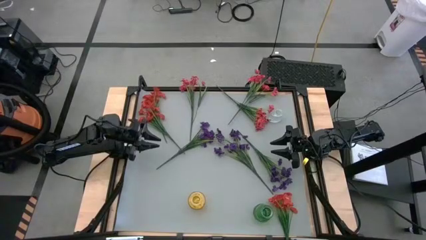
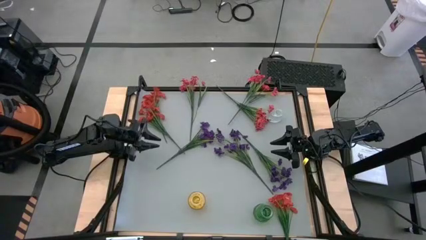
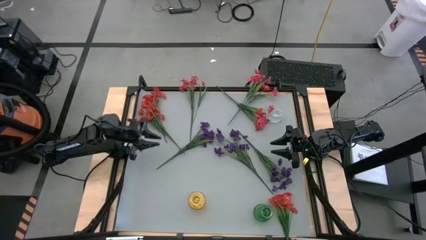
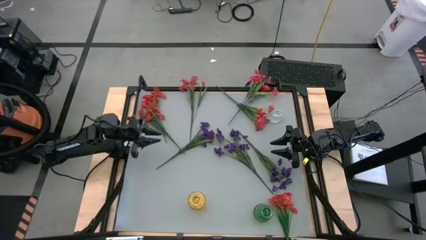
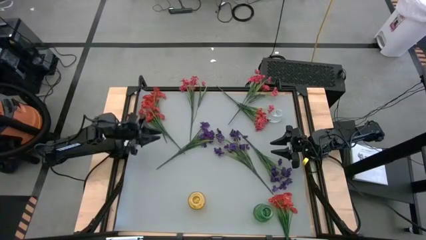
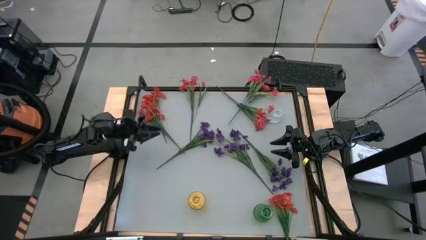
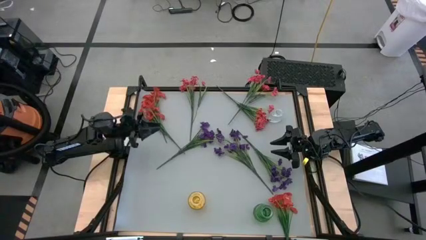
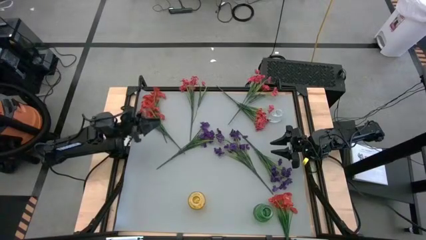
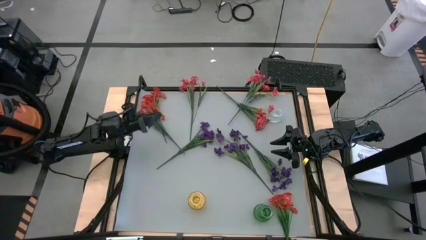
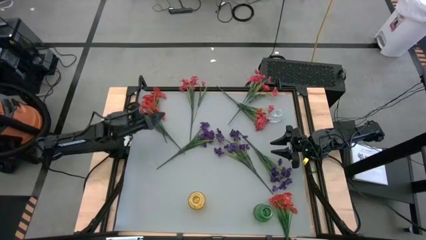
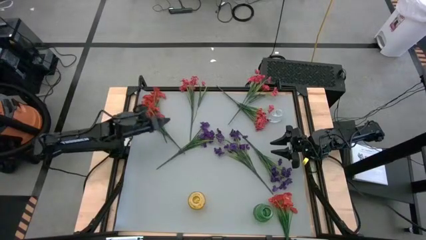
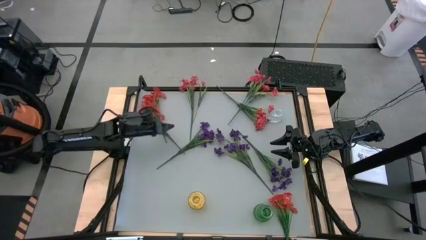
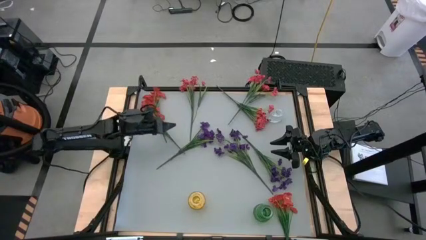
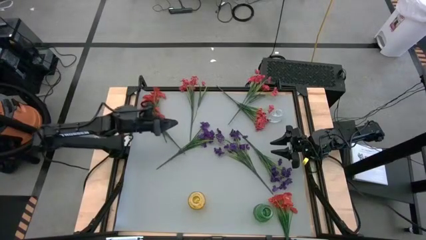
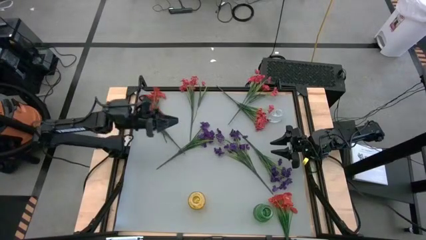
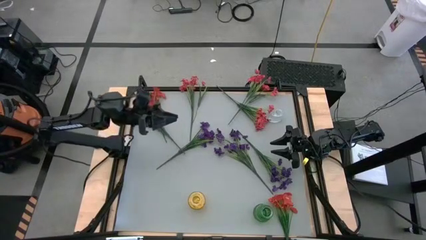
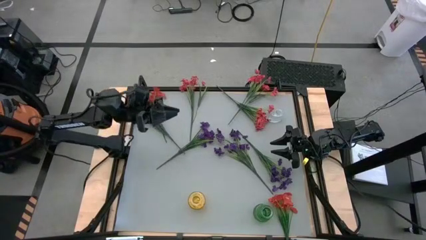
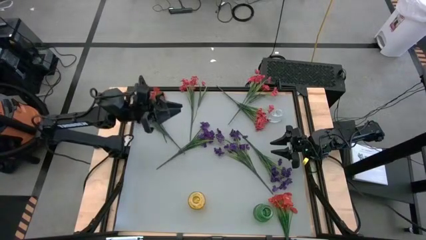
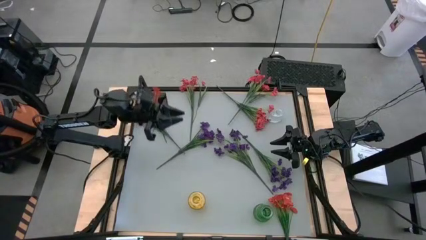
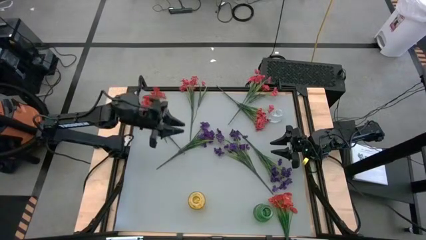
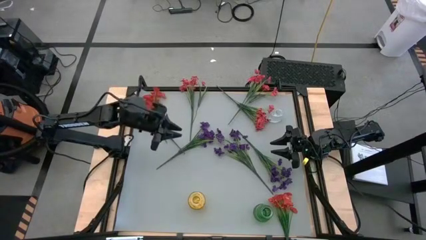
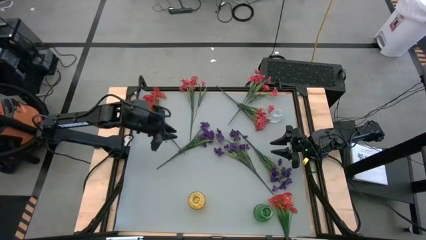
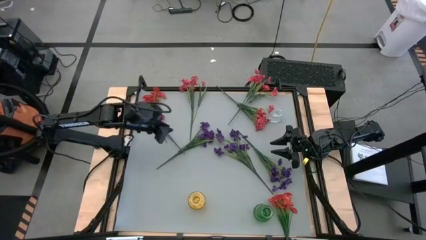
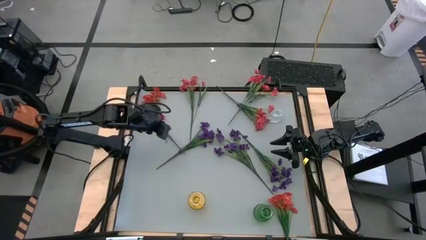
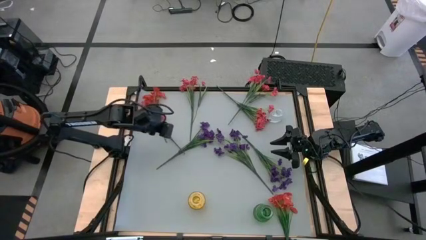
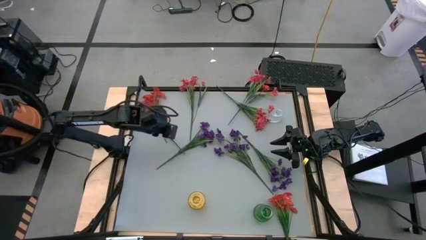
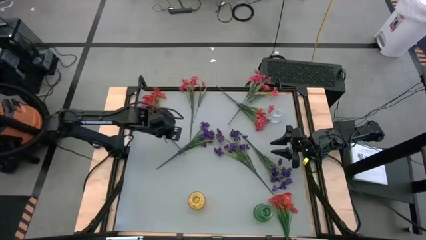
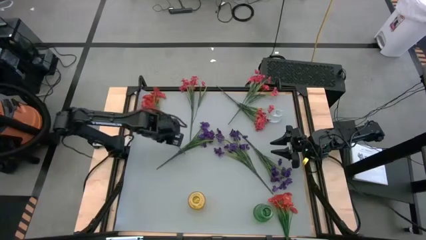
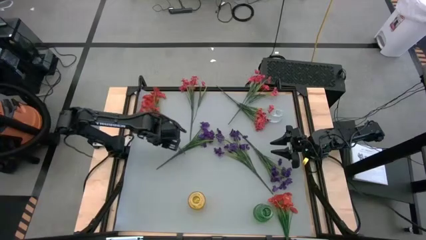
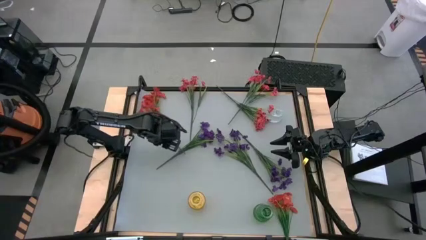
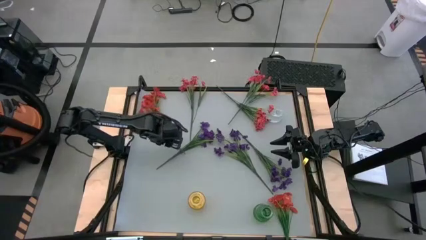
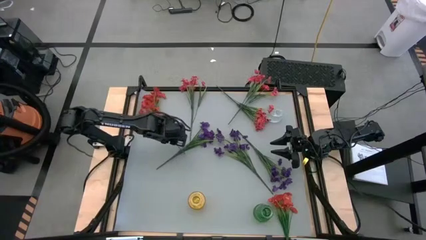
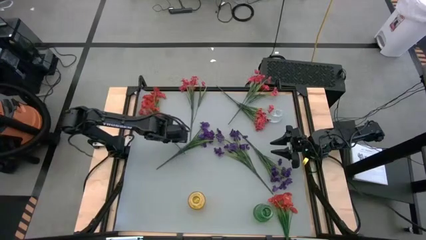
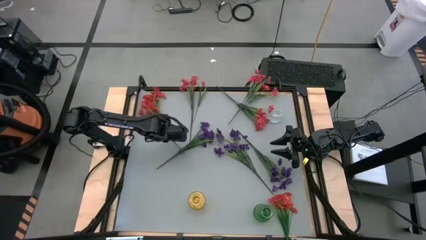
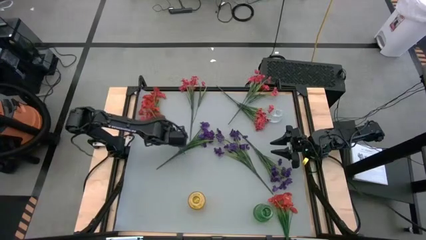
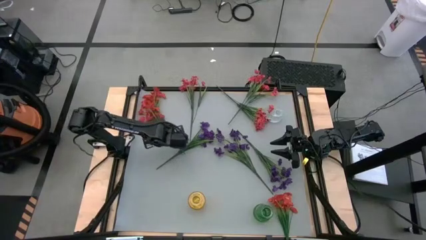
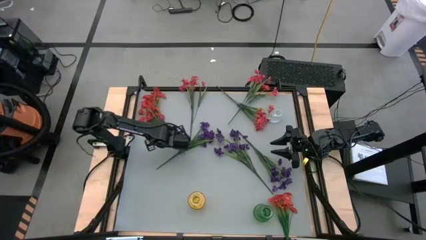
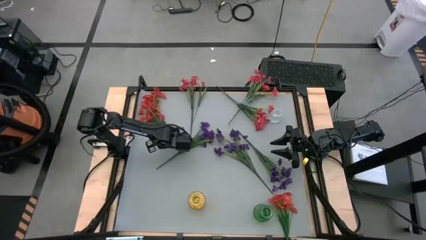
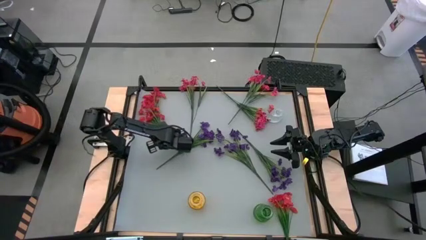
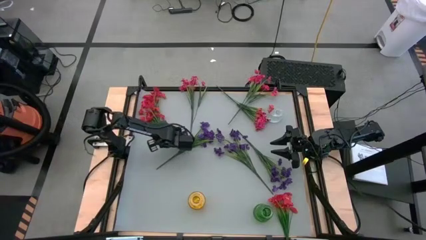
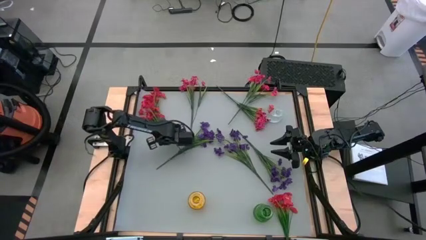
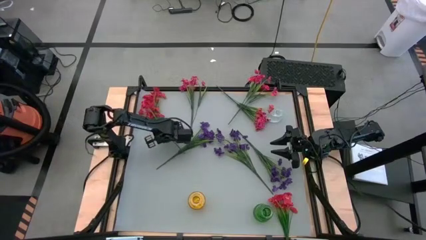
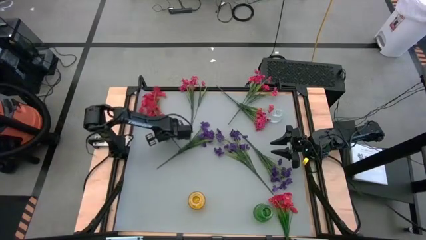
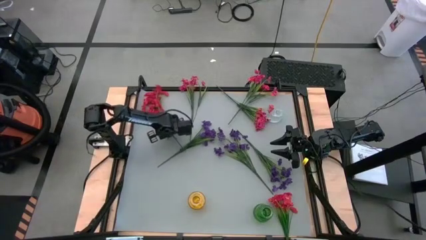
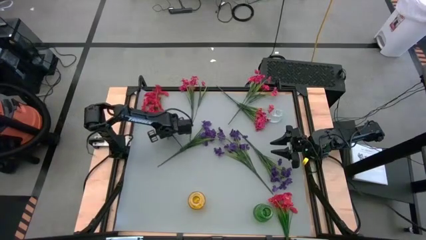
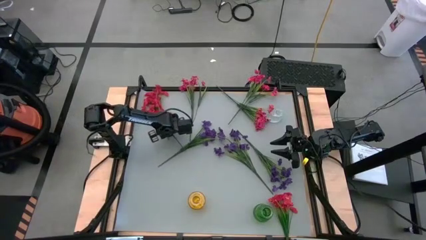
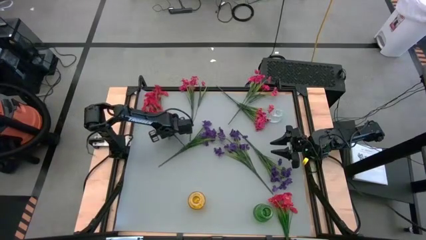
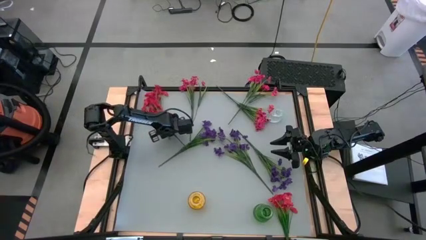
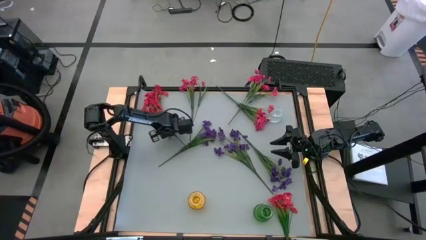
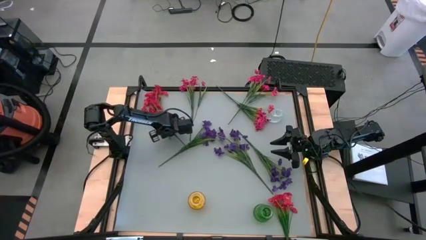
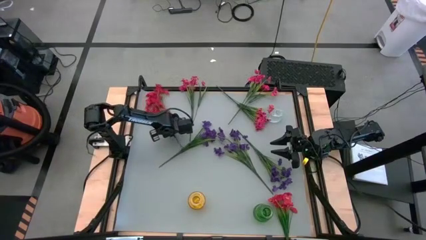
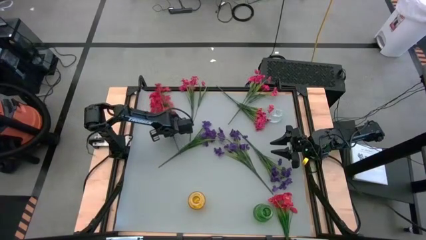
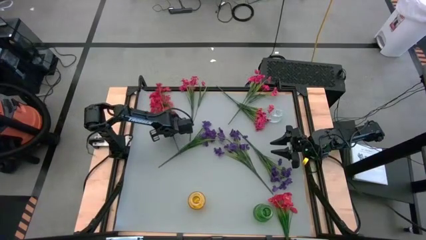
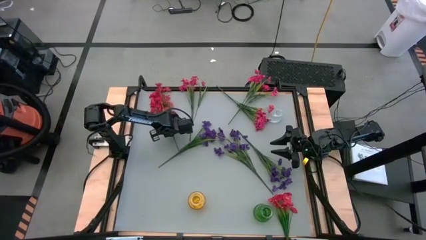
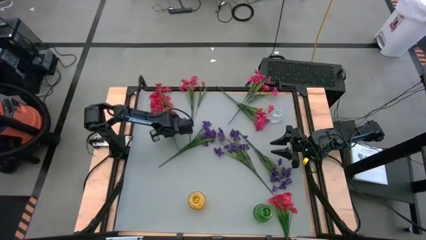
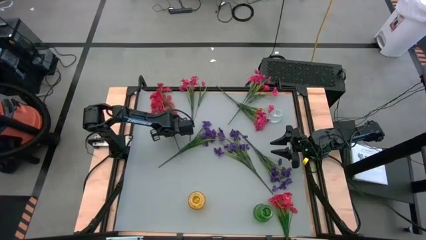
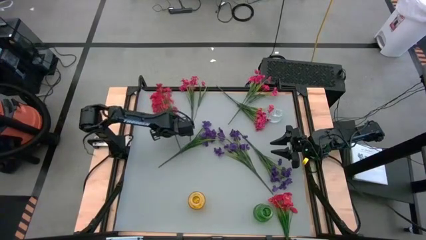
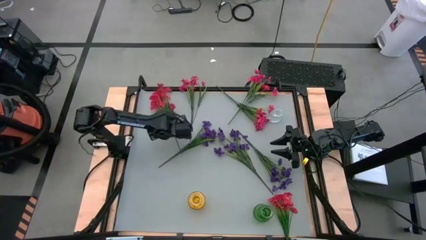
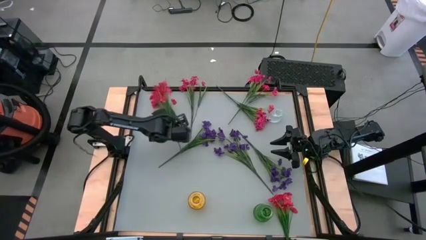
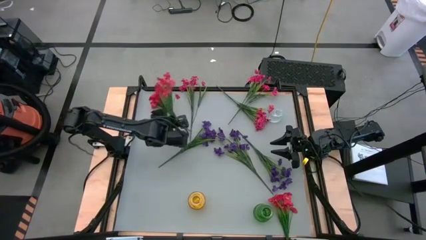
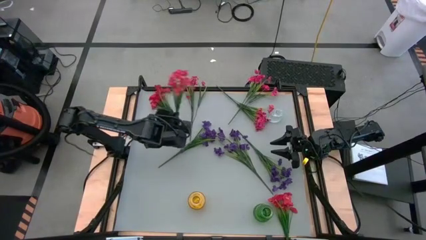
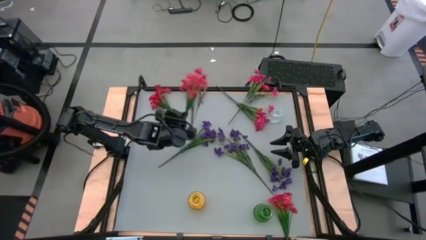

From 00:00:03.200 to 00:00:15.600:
Task: Sort flowers into vase by color
Put the bottom left red flower into the transparent vase
